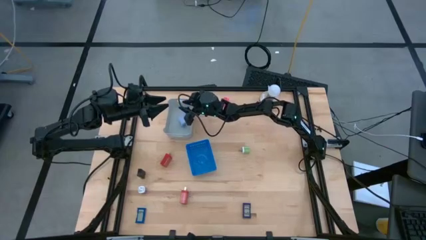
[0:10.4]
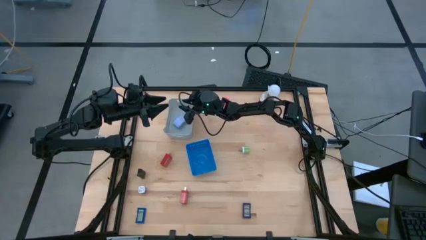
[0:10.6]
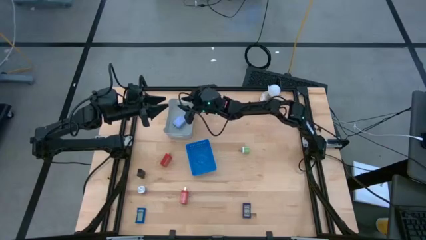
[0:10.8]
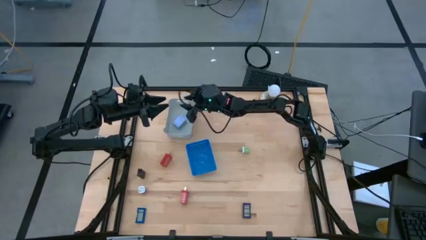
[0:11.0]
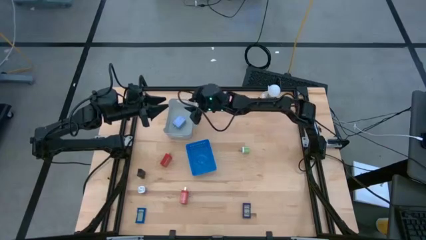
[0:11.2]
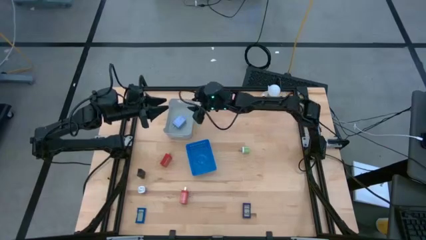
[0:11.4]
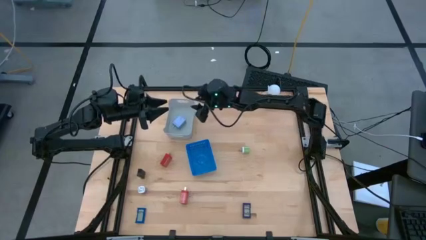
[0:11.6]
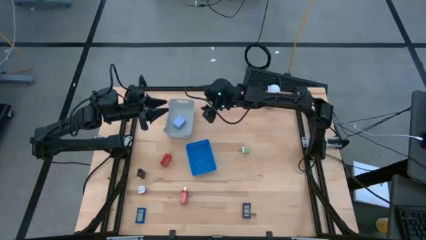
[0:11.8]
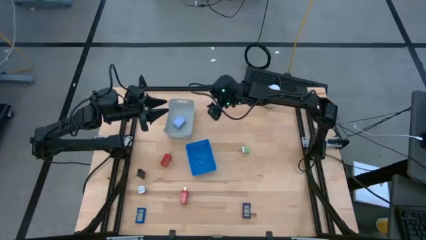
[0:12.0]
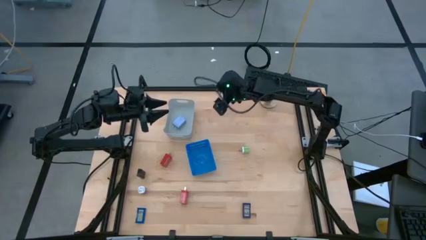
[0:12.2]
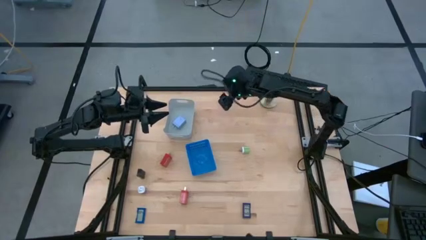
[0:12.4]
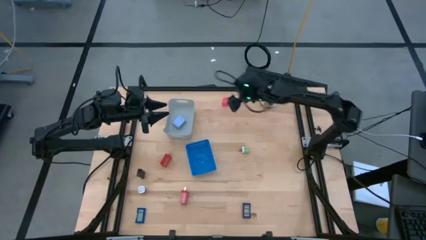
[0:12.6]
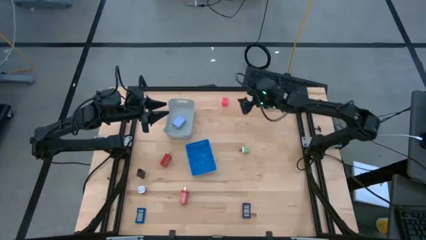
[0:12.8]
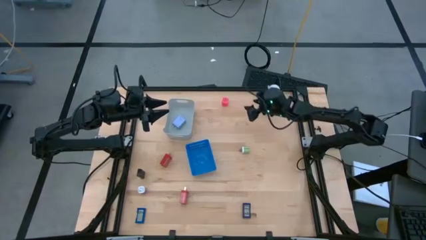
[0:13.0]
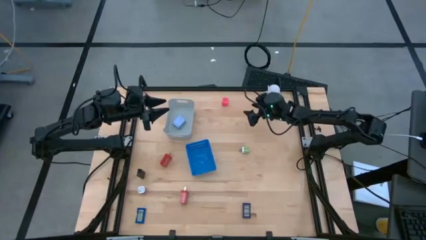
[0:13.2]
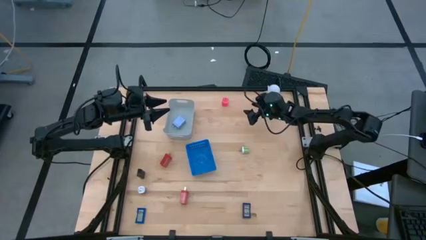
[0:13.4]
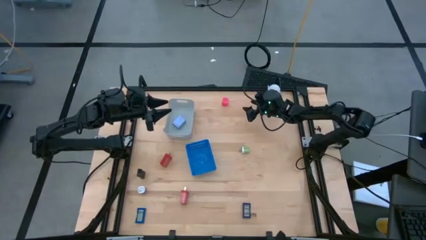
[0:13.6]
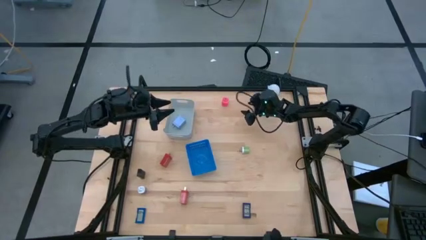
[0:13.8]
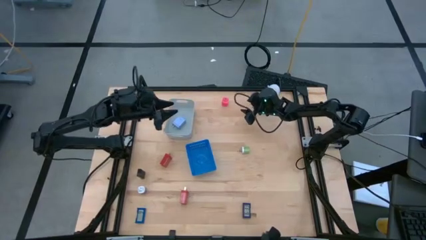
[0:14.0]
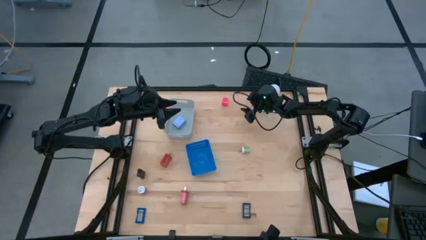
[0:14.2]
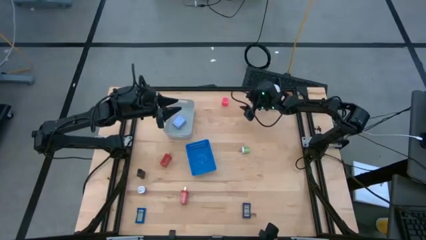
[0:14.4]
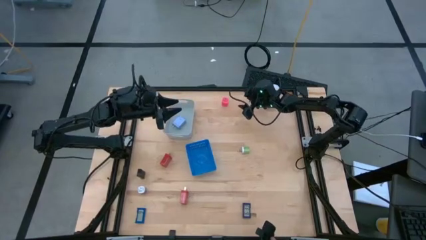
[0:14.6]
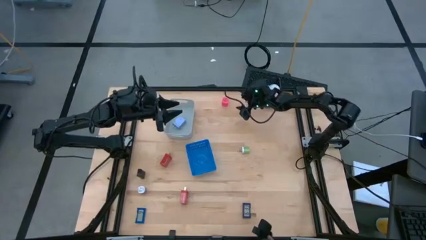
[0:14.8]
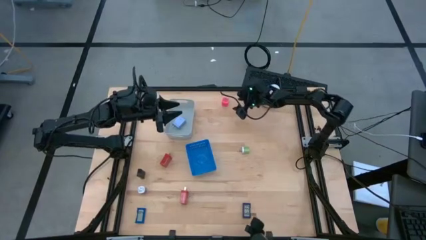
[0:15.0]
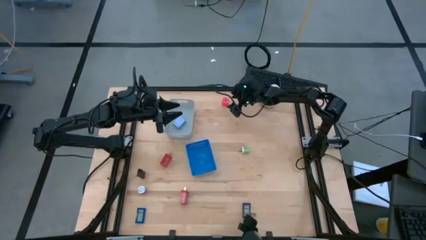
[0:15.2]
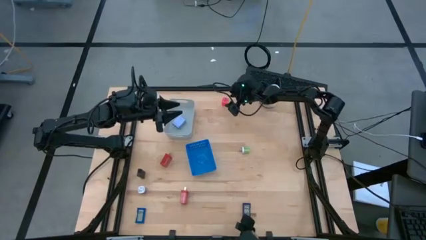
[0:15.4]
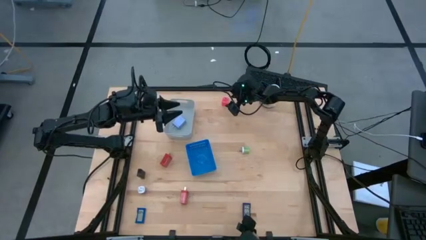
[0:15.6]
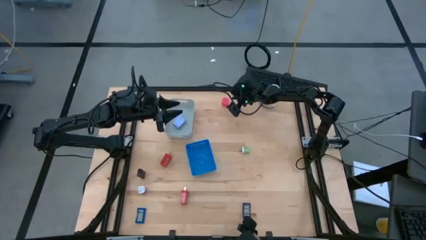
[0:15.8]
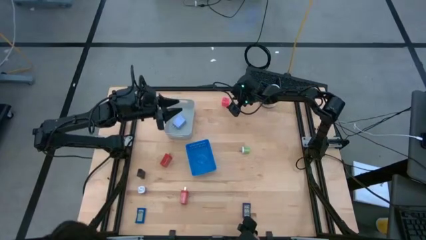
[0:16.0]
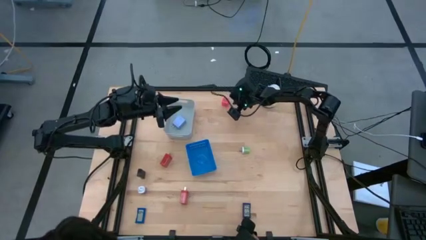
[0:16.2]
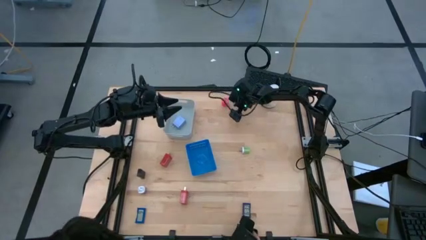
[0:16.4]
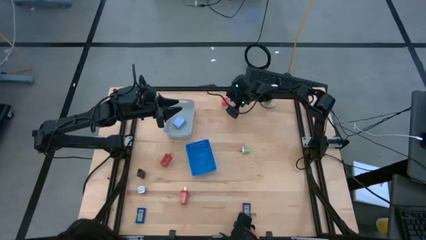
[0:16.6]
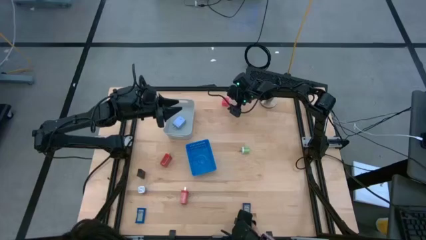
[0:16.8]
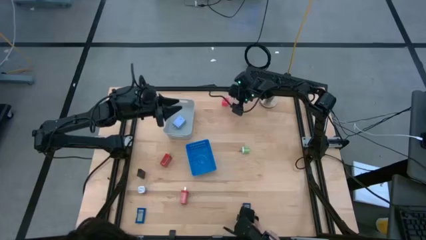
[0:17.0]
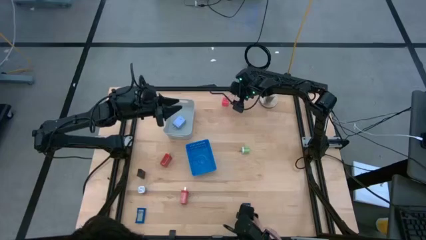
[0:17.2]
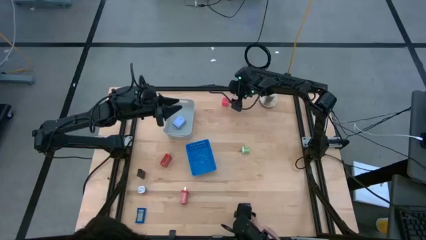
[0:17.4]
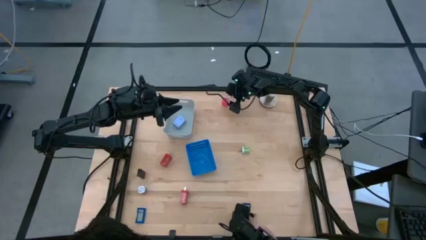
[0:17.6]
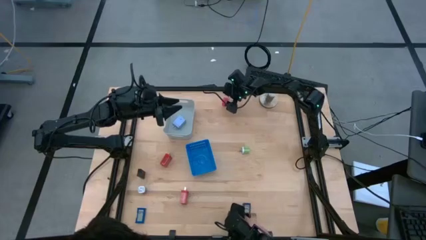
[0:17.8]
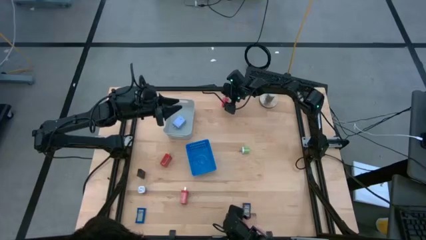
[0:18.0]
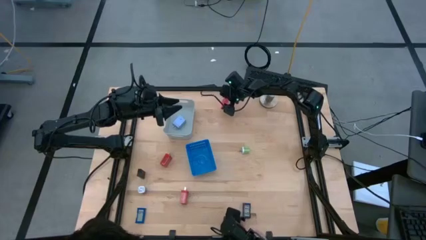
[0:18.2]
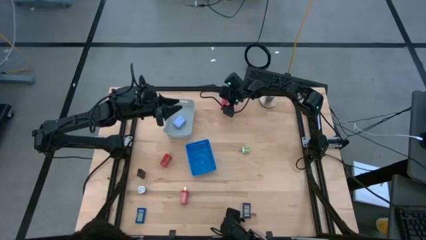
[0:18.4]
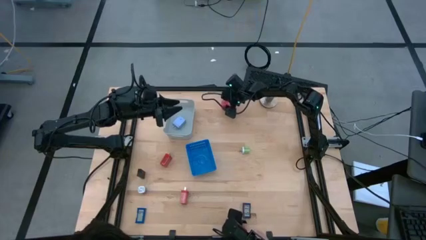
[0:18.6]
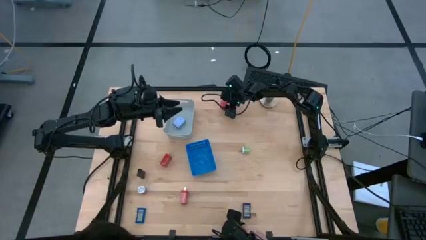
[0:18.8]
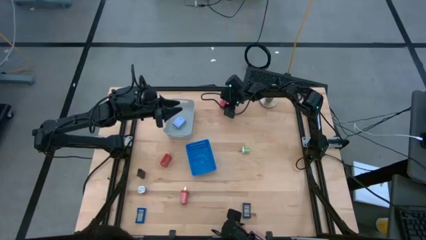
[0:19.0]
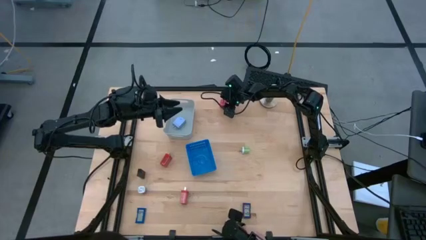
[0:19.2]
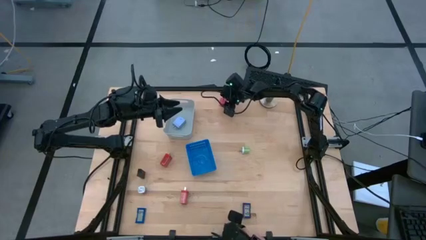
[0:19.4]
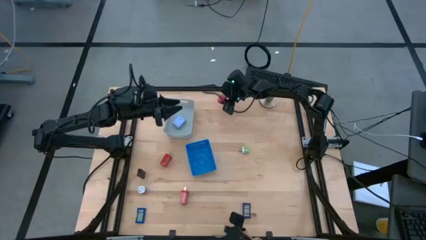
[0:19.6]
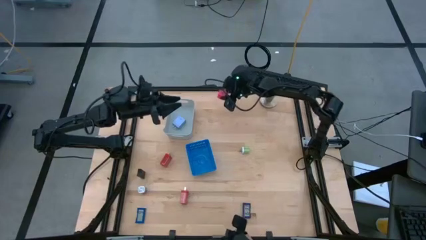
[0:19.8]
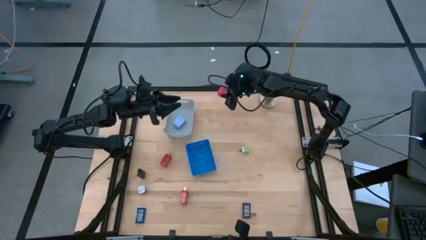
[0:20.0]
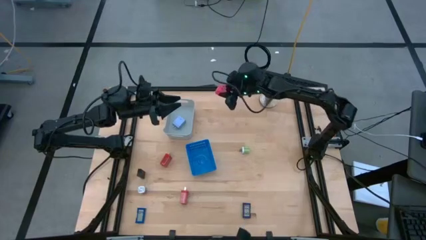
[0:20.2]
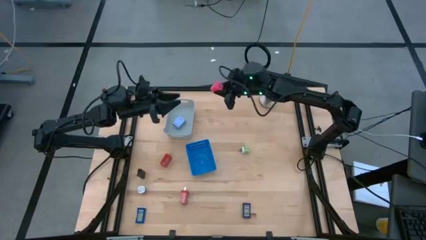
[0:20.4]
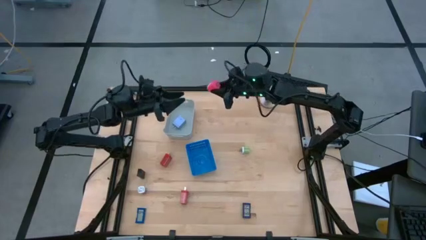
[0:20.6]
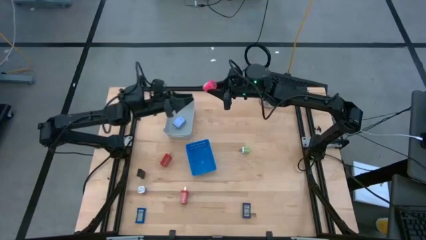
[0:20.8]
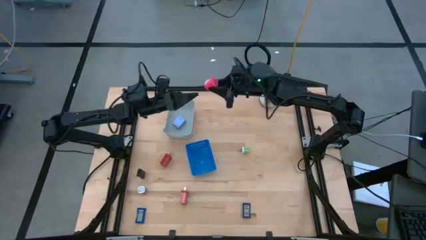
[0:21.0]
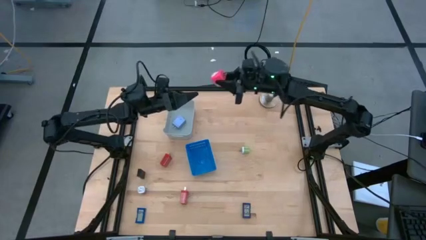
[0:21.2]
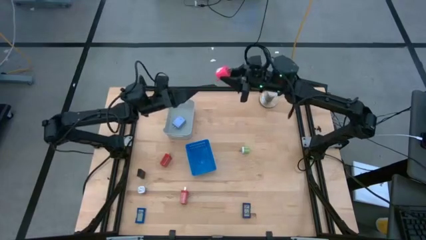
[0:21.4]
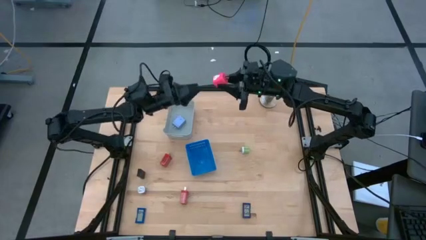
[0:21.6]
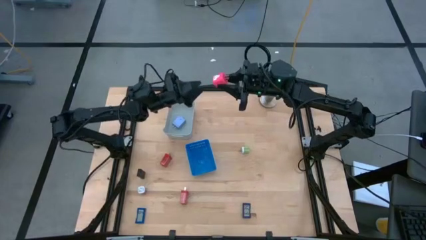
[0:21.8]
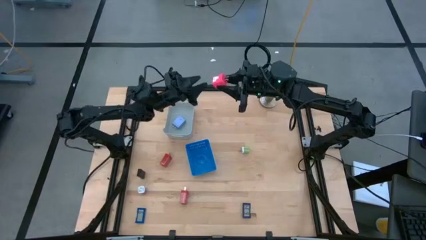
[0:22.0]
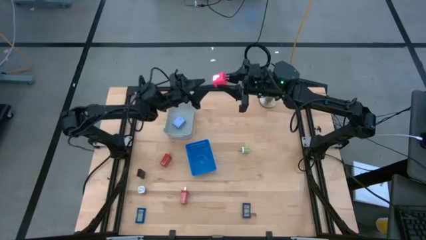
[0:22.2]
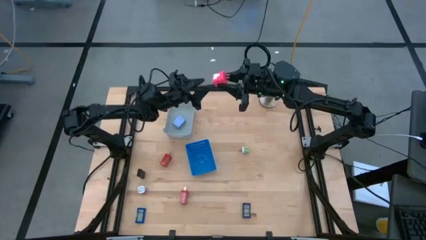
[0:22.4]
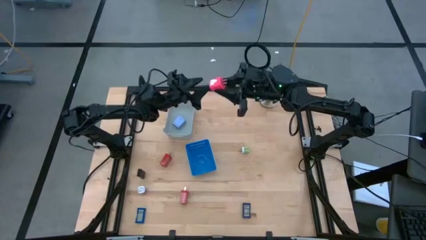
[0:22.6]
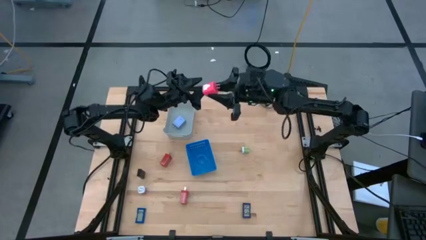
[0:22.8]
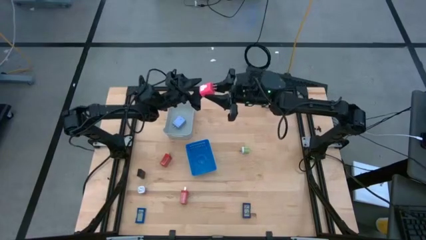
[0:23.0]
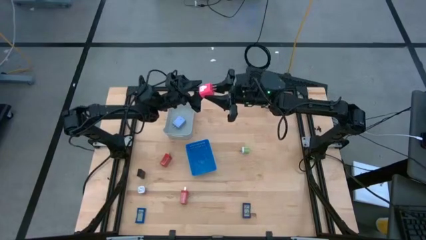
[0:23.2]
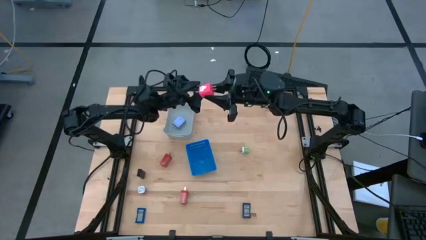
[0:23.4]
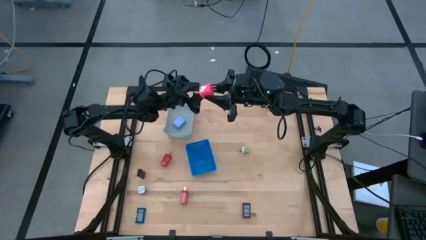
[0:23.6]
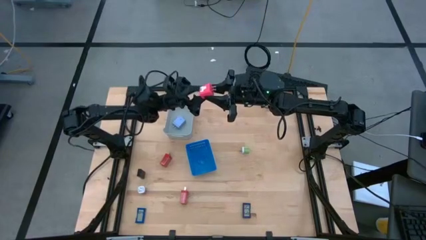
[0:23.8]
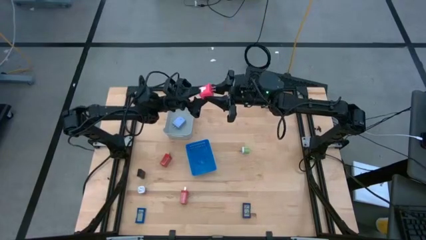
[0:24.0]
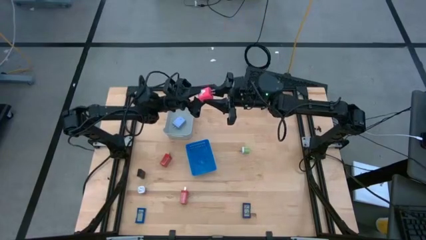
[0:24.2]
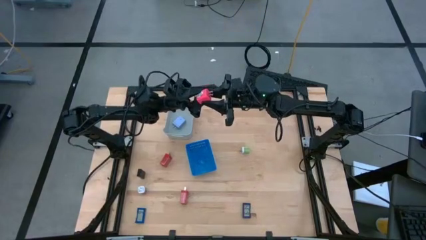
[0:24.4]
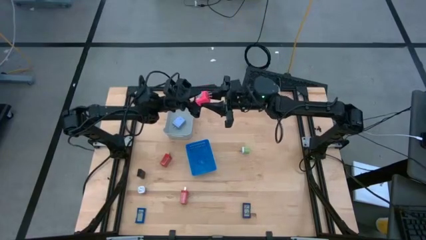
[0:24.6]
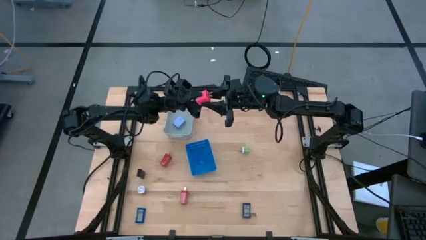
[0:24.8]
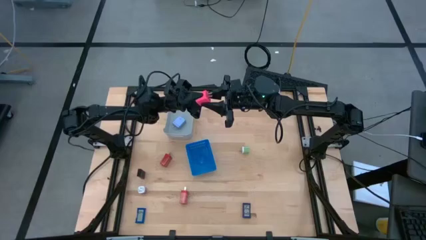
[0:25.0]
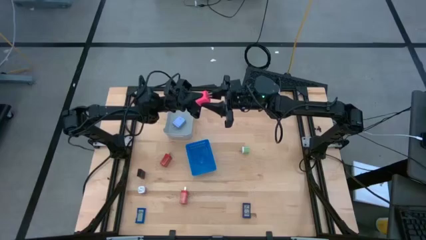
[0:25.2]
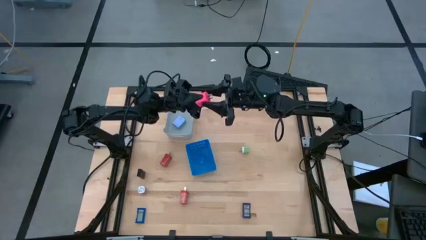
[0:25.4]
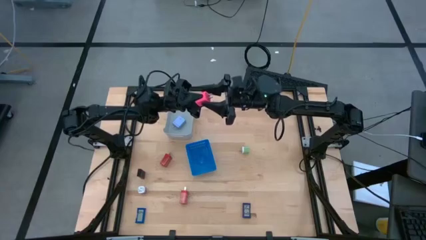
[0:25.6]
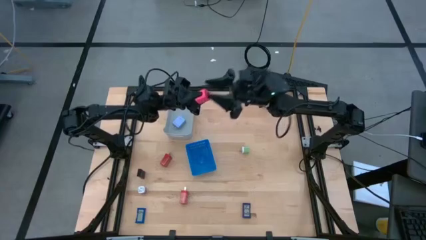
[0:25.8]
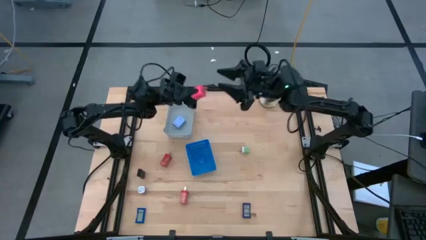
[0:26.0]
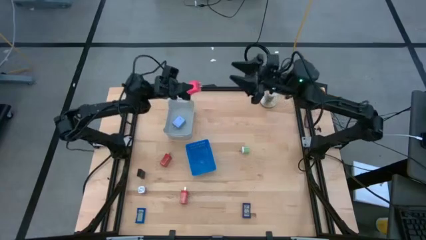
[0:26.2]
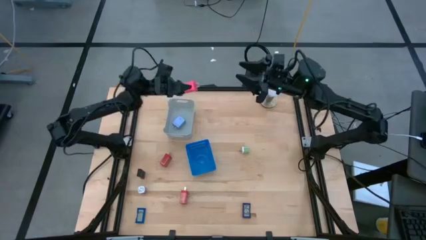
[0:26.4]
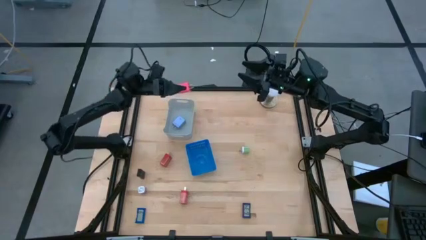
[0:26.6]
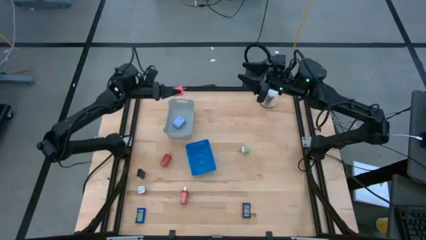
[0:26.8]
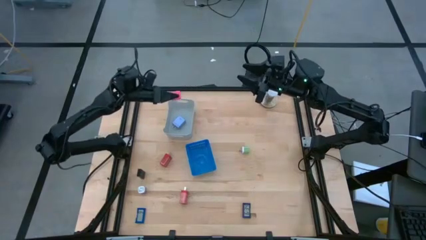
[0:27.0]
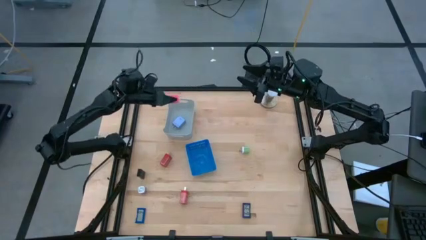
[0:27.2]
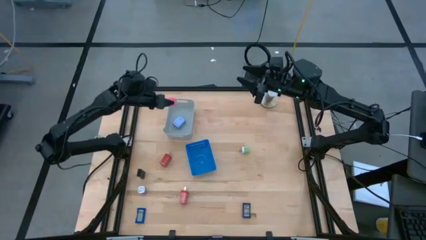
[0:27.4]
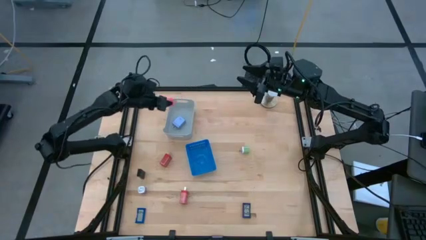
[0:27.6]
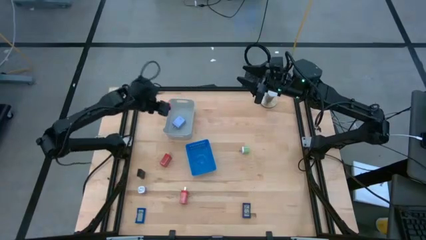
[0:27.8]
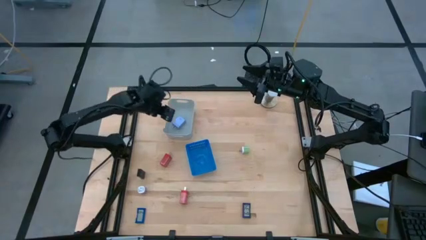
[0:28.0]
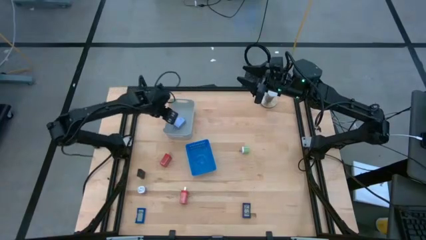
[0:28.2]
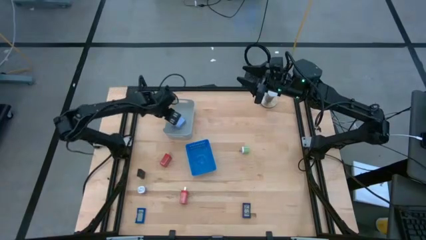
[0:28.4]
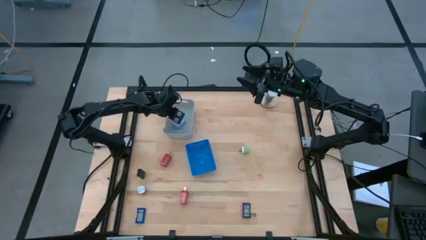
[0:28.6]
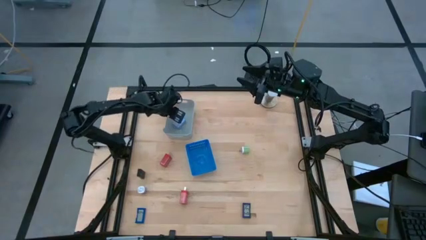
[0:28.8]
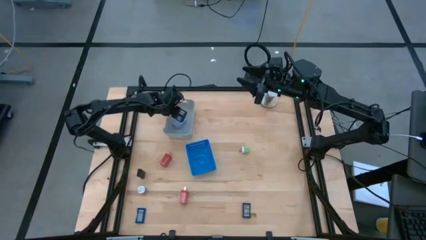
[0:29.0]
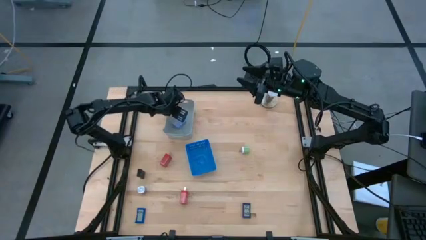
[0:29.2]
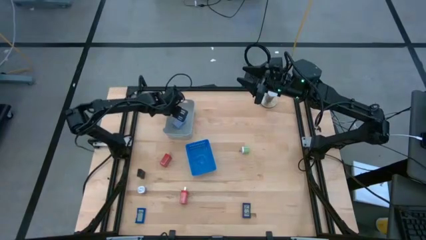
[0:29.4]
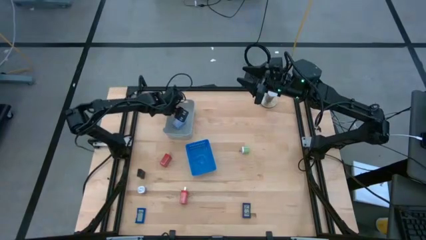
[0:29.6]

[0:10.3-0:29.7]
Task: Pick & Place Office items
Put the pink charger adapter into the gray bin
